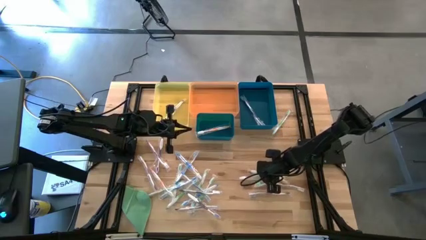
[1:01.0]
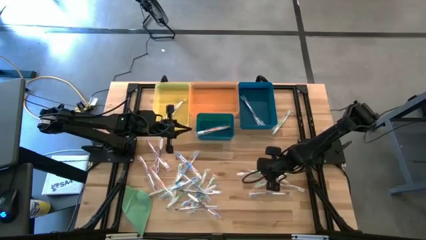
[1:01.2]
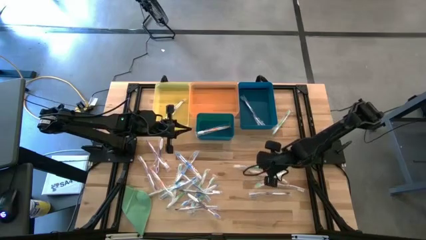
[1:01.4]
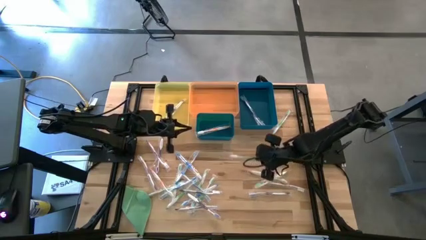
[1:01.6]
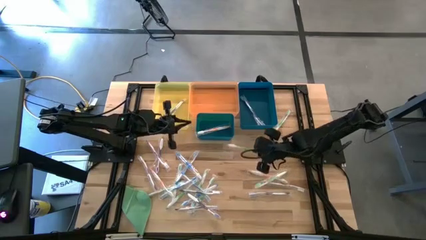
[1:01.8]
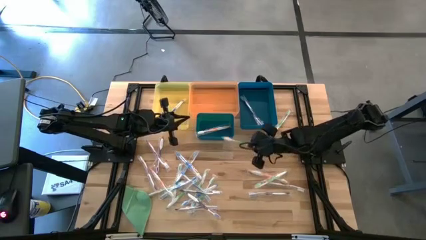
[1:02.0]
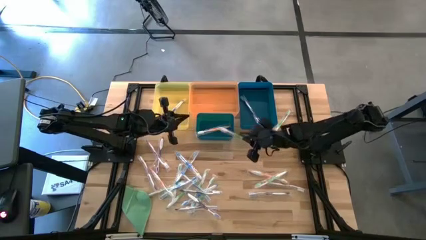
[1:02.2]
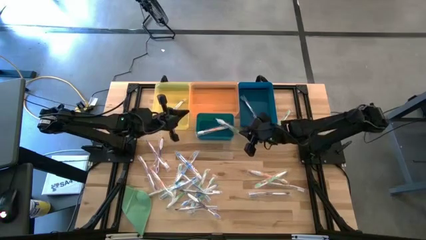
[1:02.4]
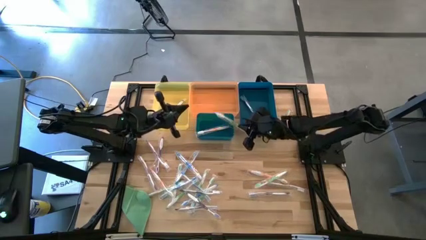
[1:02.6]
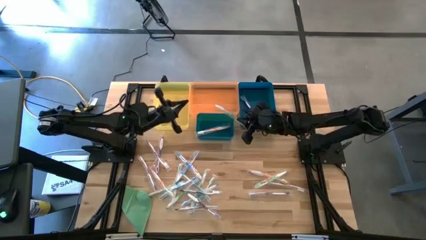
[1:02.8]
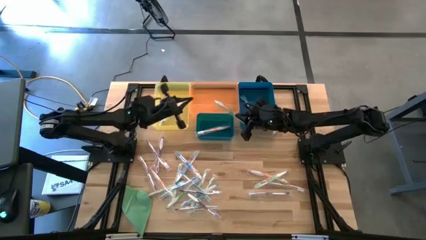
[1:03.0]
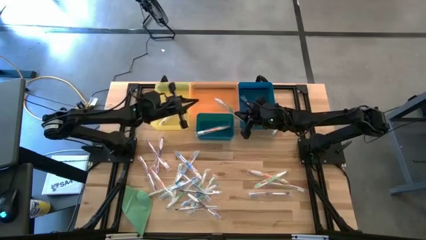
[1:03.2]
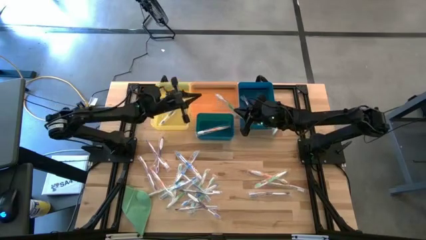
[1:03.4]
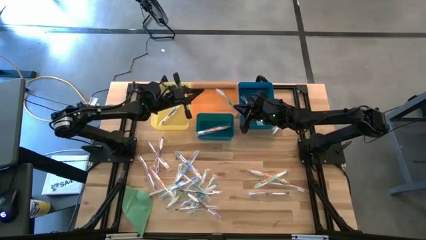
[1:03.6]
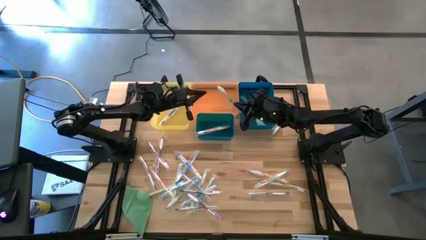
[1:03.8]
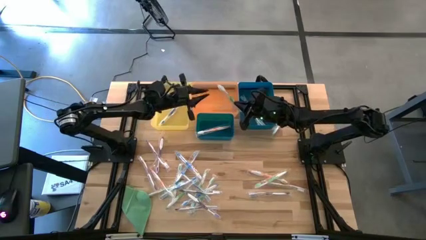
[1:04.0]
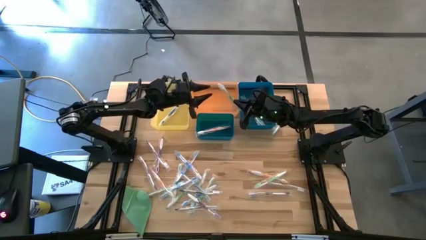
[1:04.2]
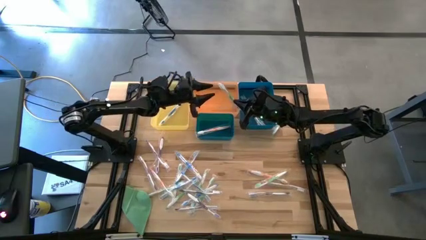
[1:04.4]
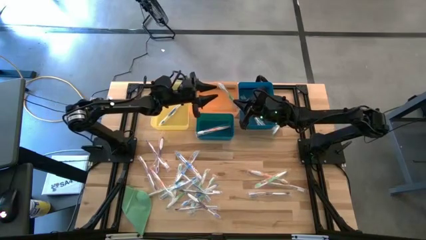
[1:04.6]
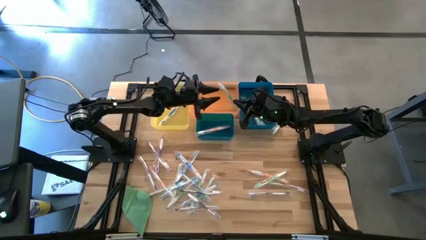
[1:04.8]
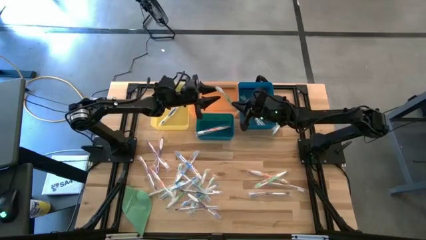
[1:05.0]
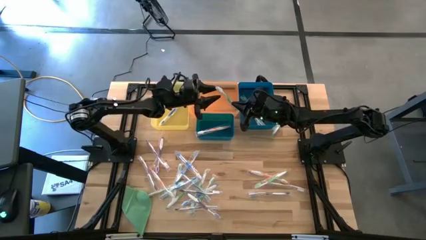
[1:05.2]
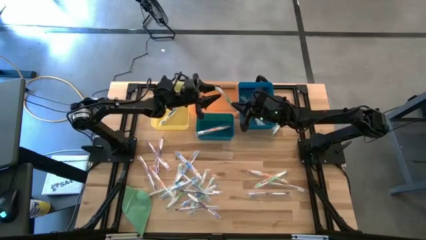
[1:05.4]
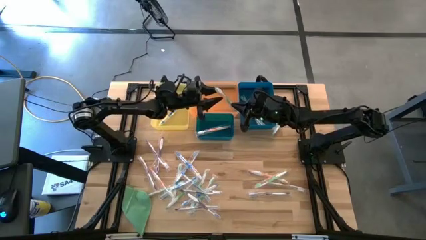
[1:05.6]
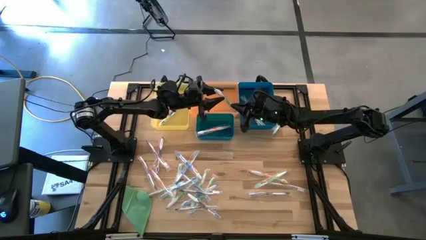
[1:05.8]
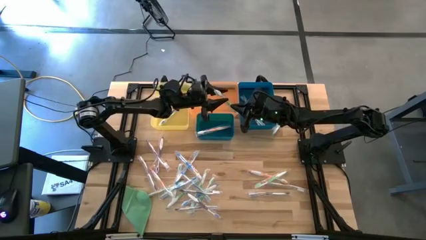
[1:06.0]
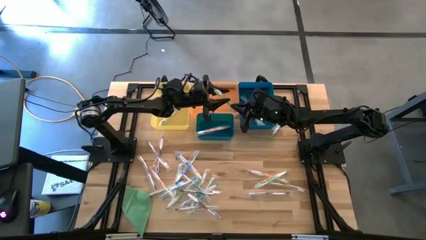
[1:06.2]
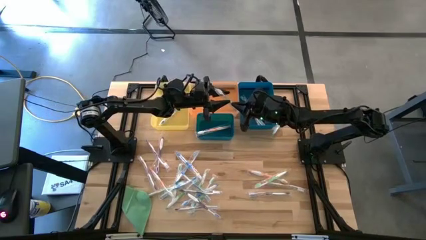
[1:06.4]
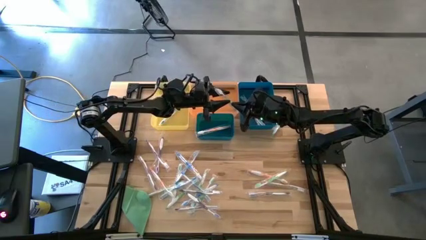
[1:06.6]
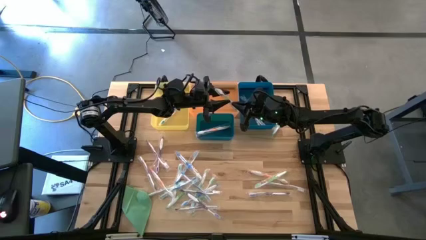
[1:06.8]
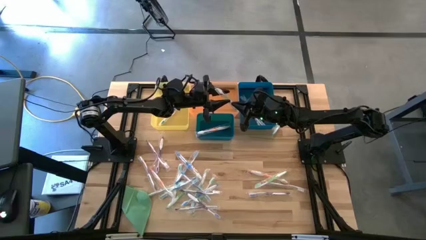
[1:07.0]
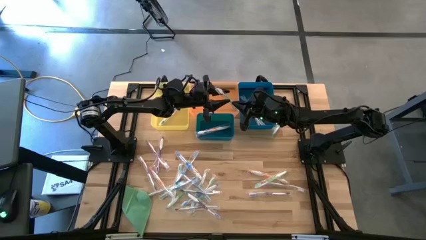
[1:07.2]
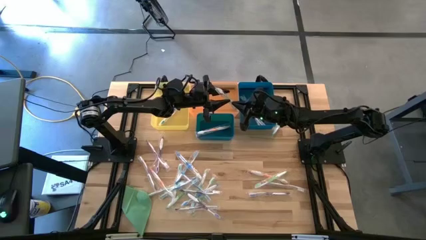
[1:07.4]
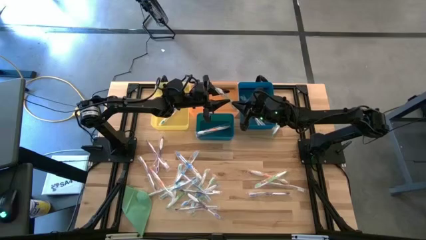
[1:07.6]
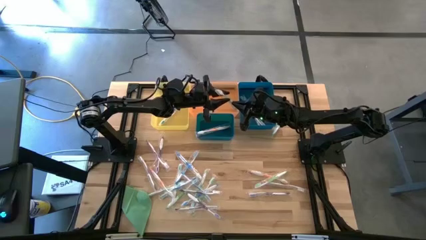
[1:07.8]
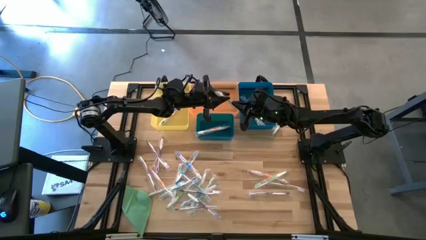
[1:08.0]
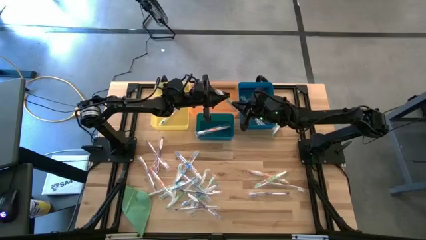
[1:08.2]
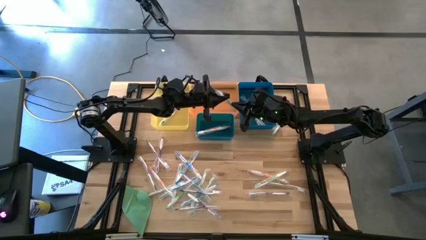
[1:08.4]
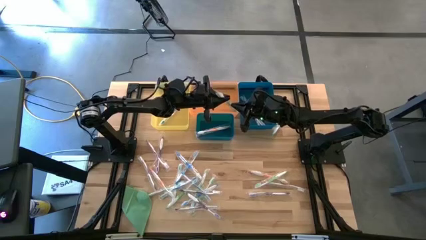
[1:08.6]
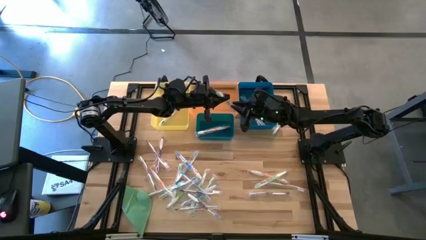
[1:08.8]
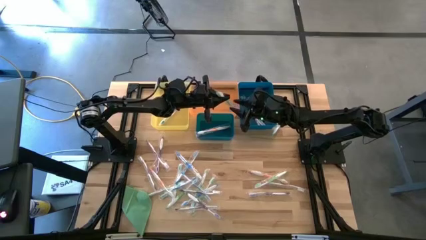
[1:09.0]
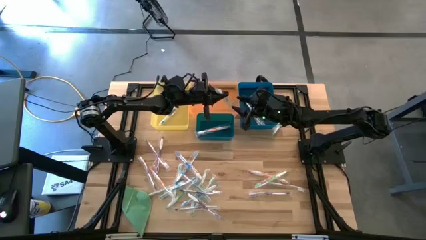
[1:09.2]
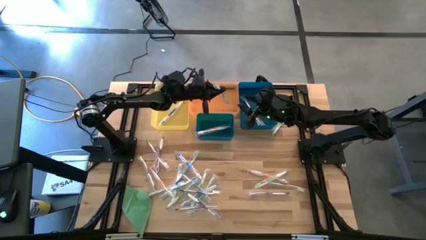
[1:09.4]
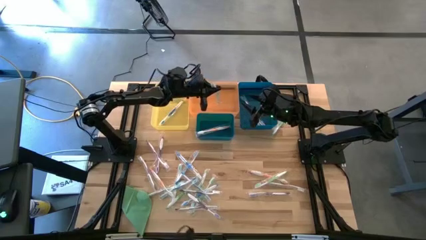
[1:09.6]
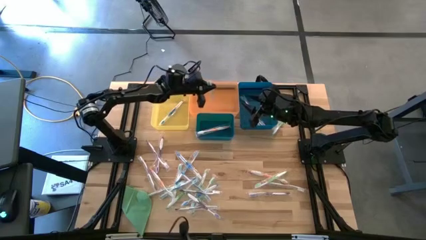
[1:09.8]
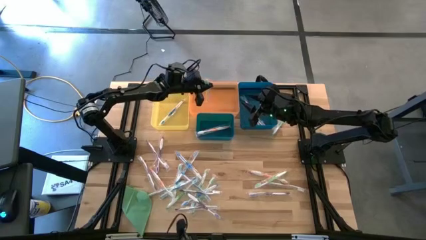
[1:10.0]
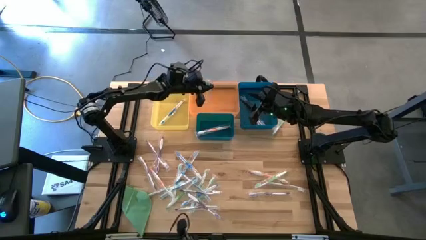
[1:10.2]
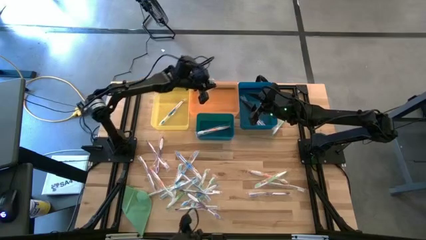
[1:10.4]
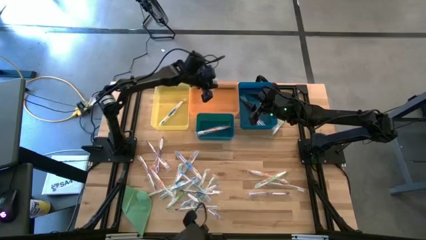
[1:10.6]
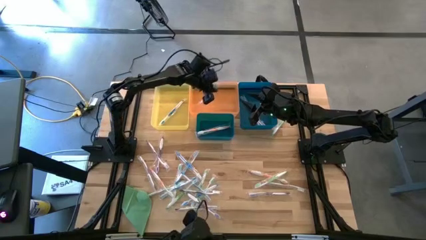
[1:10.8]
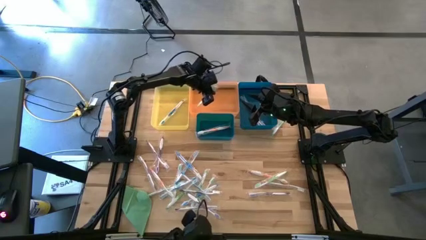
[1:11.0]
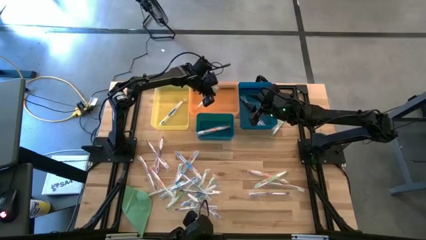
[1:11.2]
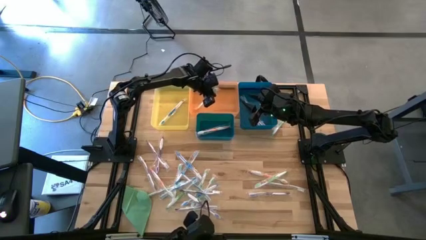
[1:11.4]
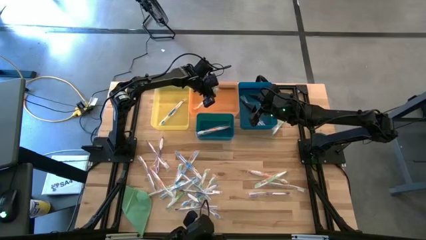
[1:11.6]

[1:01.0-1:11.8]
Task: Pick & Place Toothbrushes
Put the green toothbrush into the orange bin
